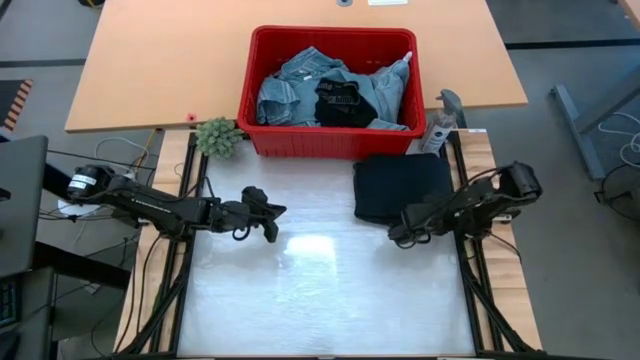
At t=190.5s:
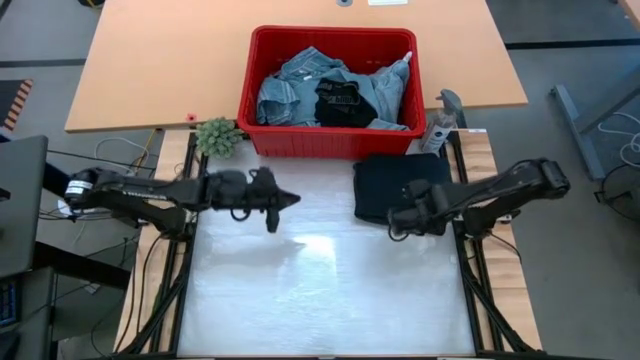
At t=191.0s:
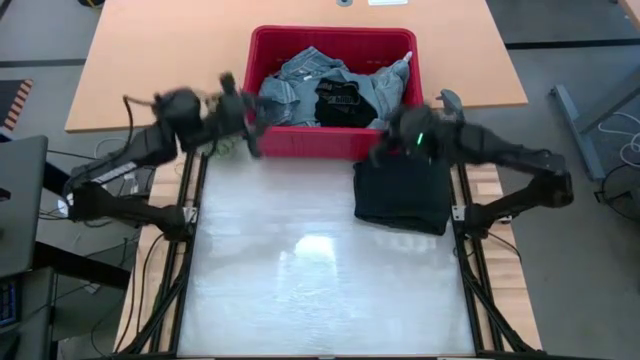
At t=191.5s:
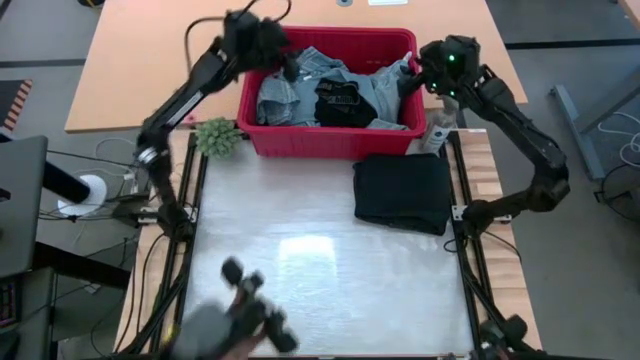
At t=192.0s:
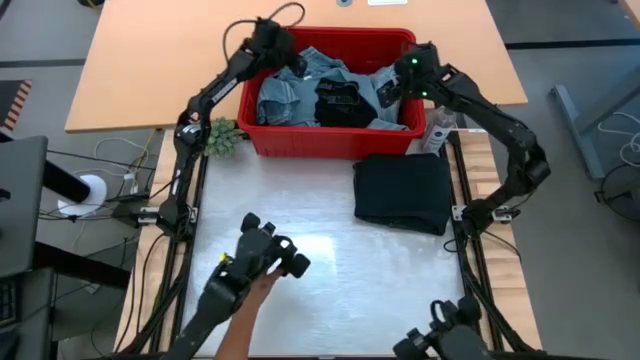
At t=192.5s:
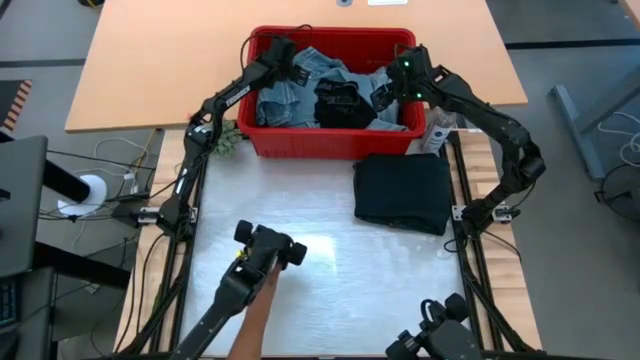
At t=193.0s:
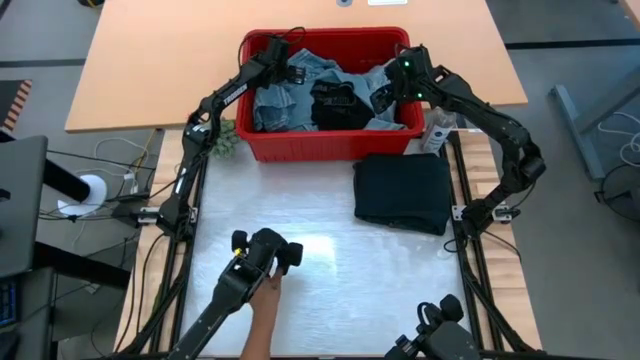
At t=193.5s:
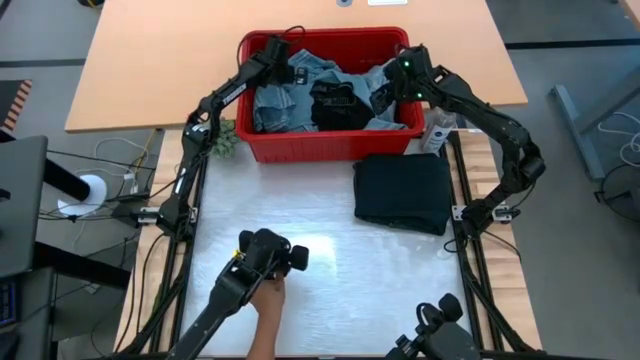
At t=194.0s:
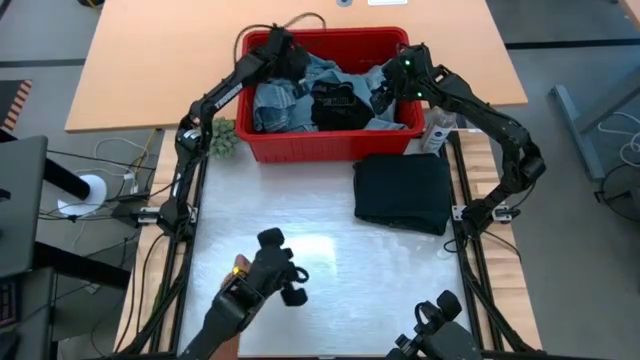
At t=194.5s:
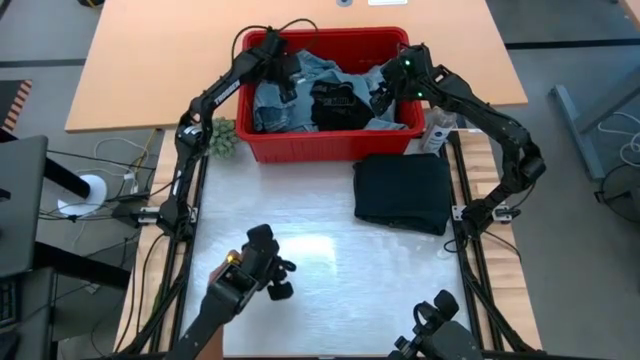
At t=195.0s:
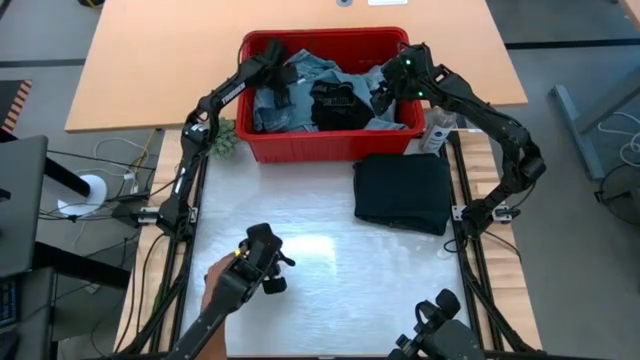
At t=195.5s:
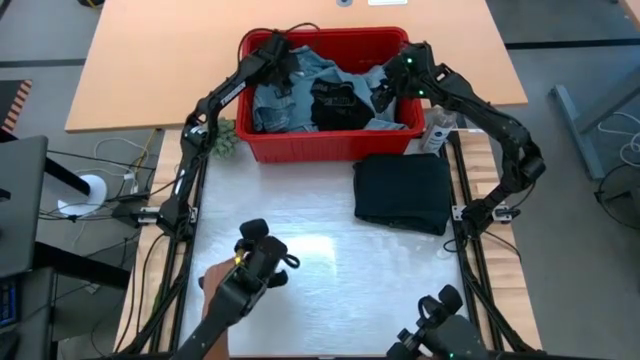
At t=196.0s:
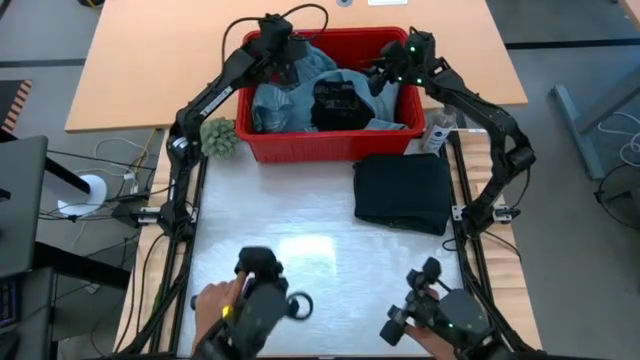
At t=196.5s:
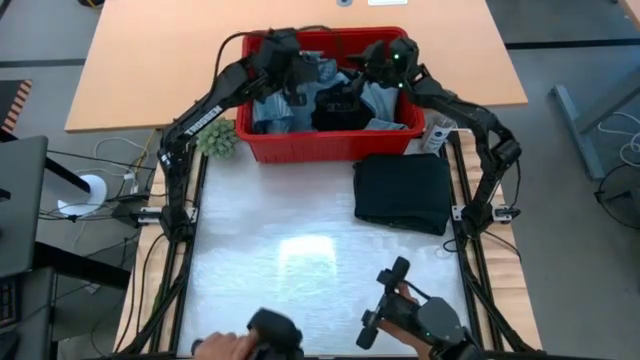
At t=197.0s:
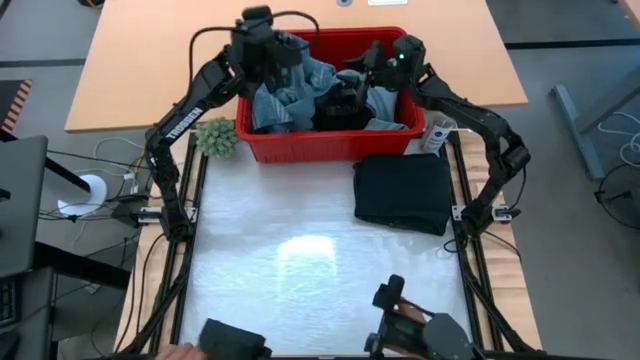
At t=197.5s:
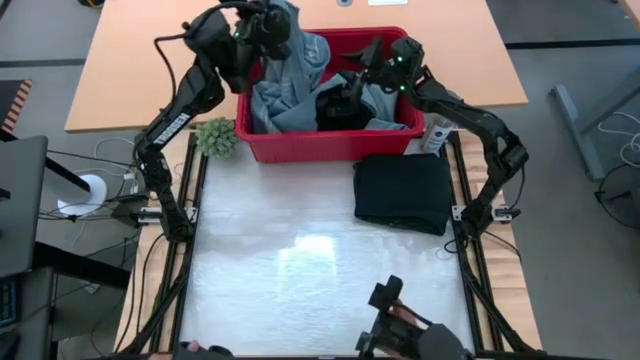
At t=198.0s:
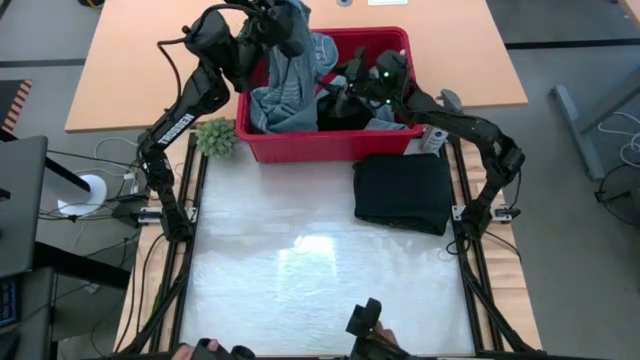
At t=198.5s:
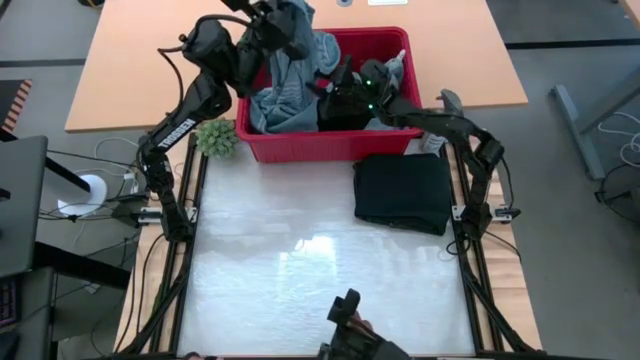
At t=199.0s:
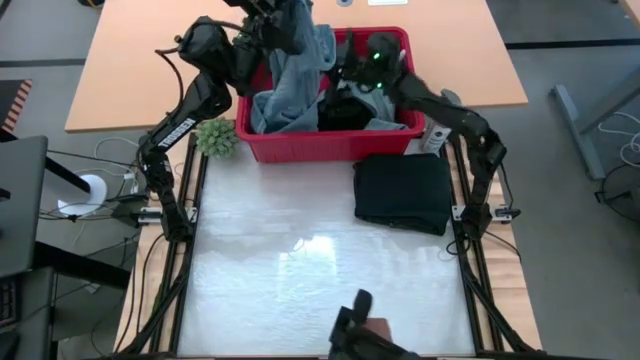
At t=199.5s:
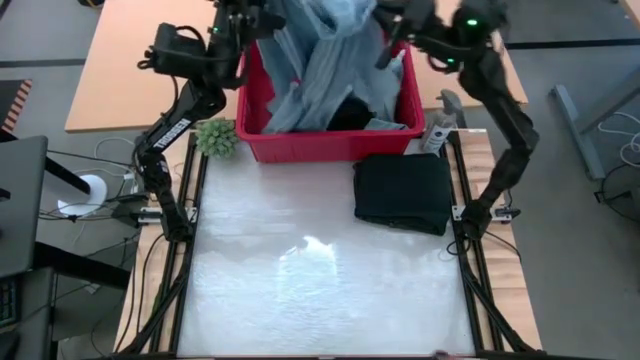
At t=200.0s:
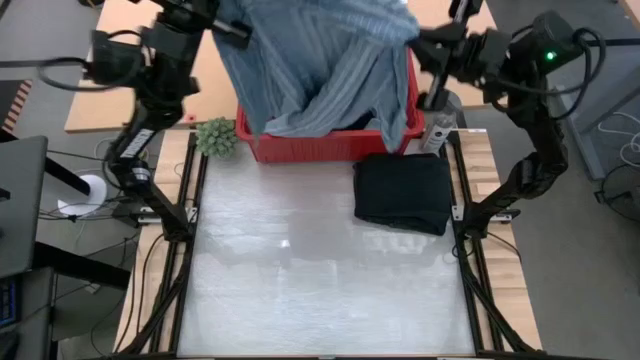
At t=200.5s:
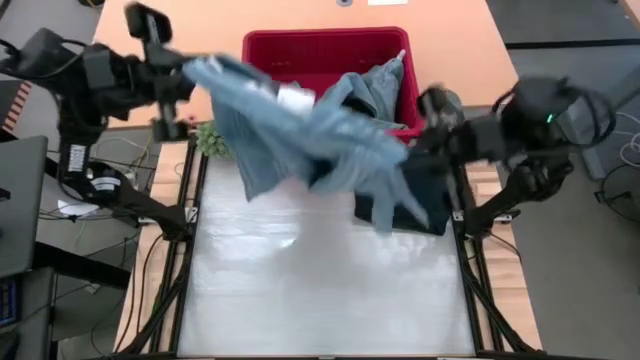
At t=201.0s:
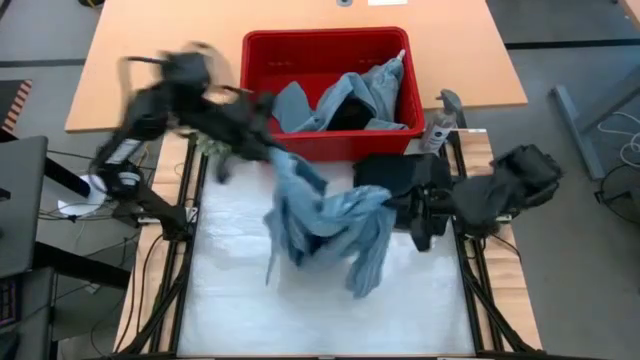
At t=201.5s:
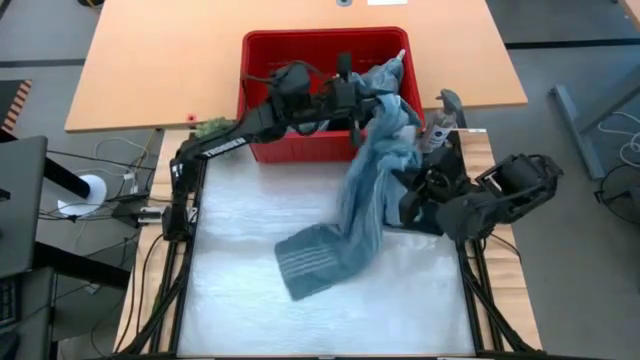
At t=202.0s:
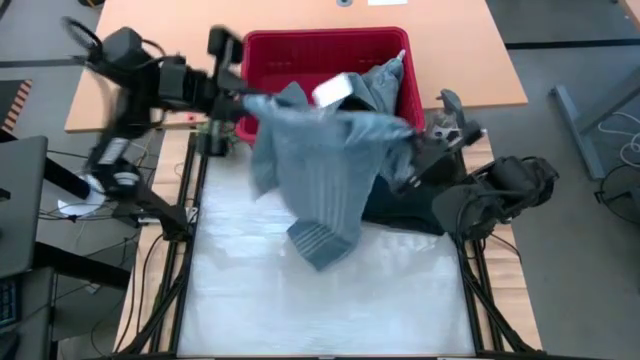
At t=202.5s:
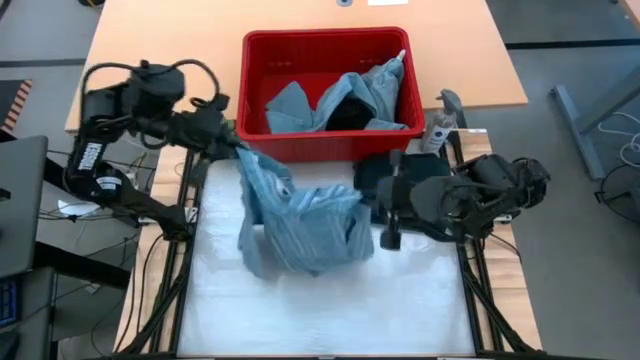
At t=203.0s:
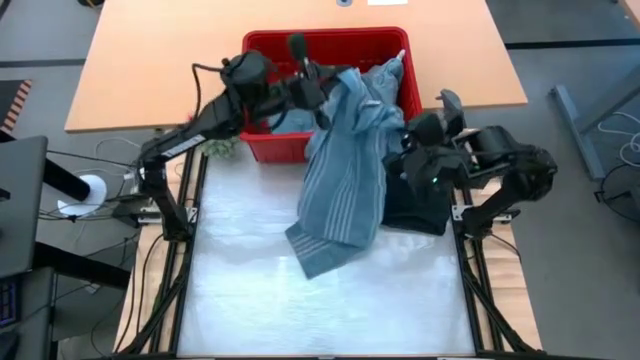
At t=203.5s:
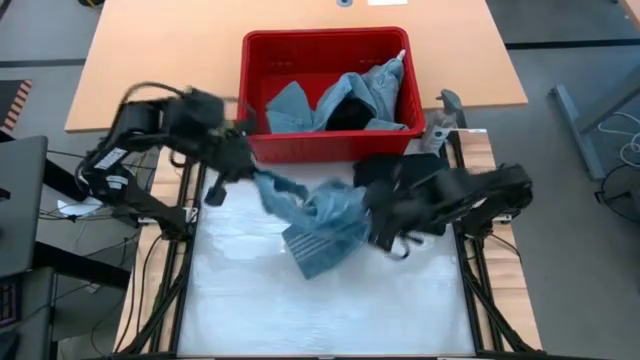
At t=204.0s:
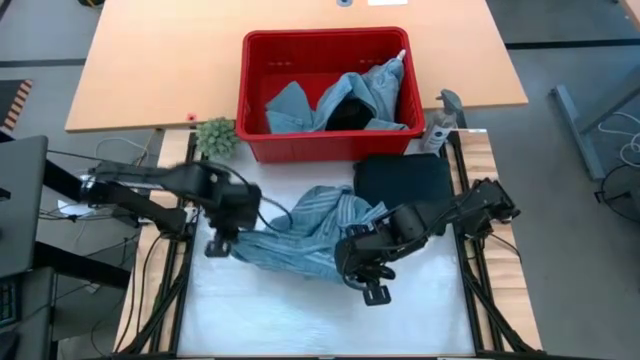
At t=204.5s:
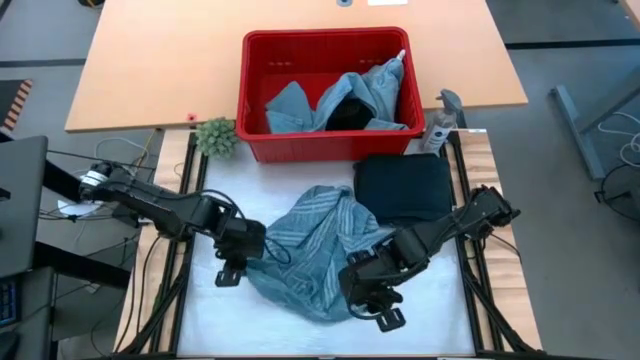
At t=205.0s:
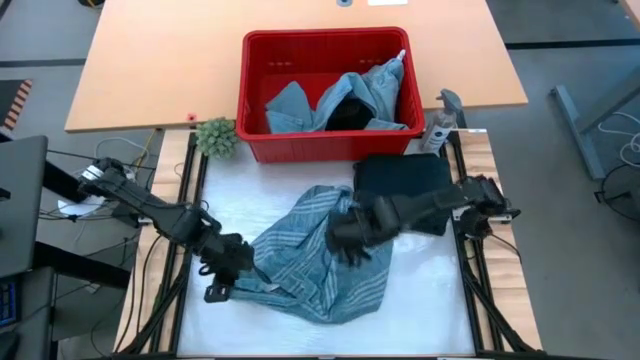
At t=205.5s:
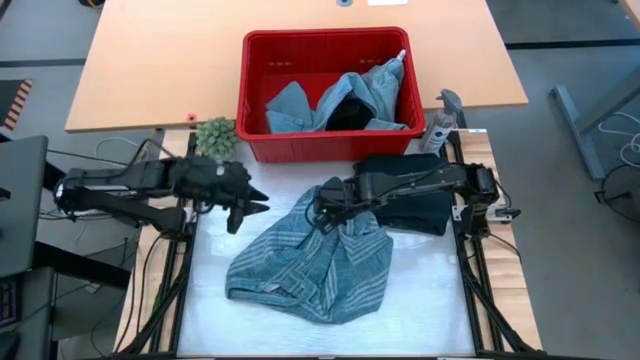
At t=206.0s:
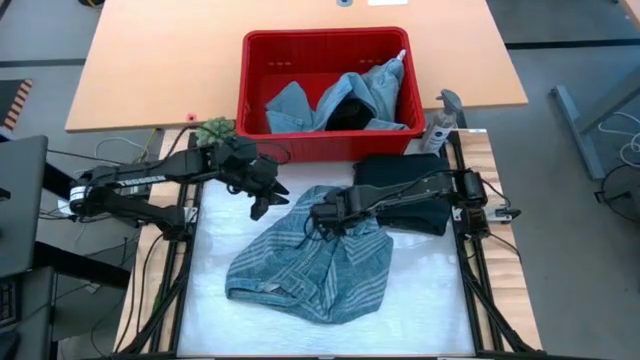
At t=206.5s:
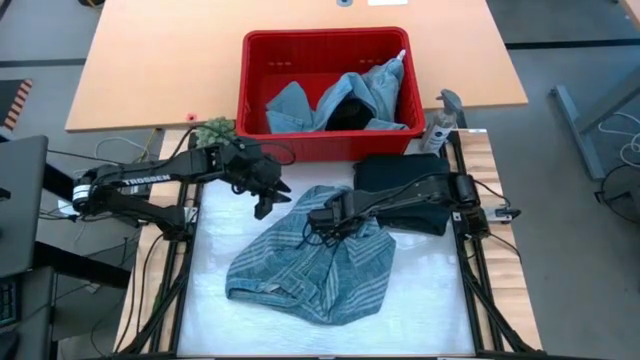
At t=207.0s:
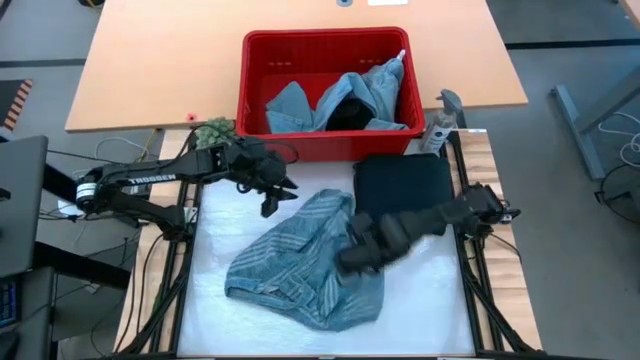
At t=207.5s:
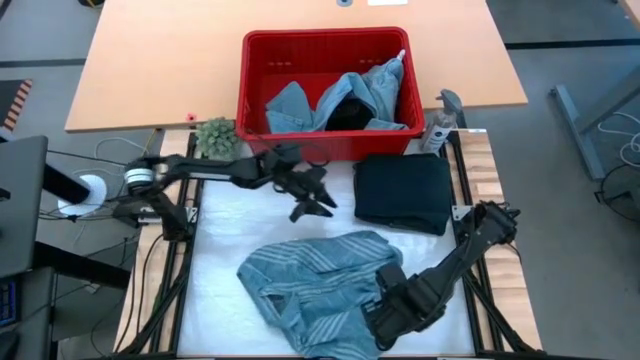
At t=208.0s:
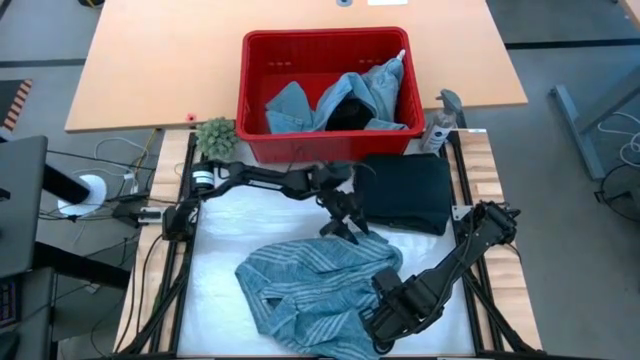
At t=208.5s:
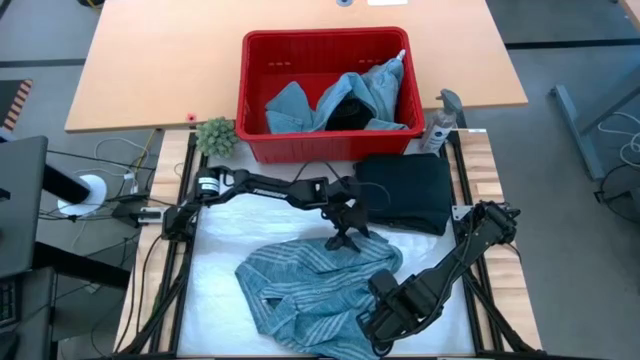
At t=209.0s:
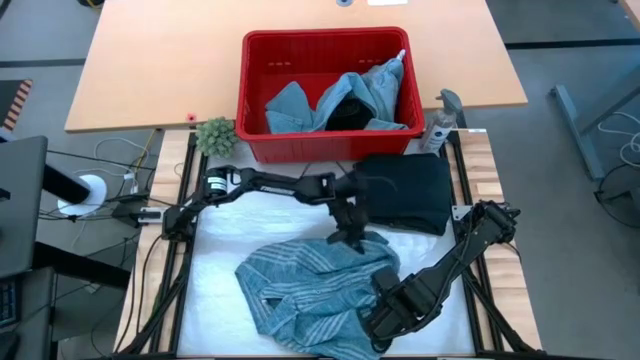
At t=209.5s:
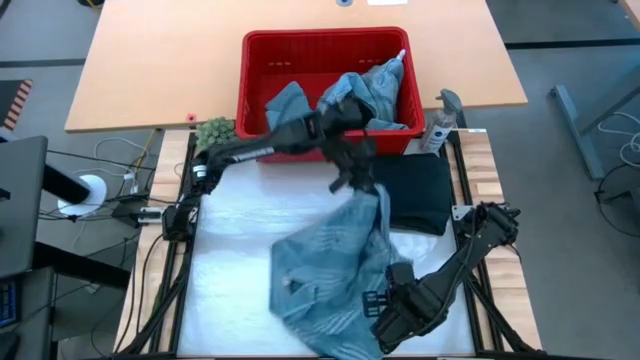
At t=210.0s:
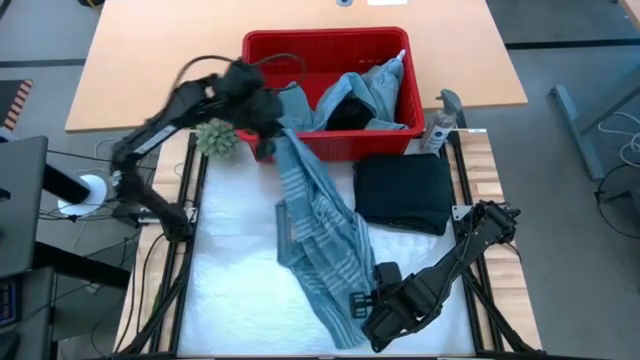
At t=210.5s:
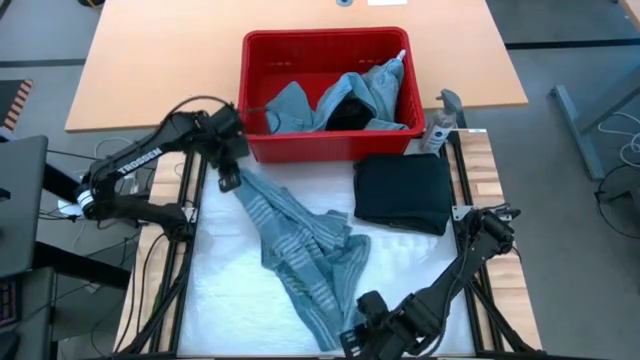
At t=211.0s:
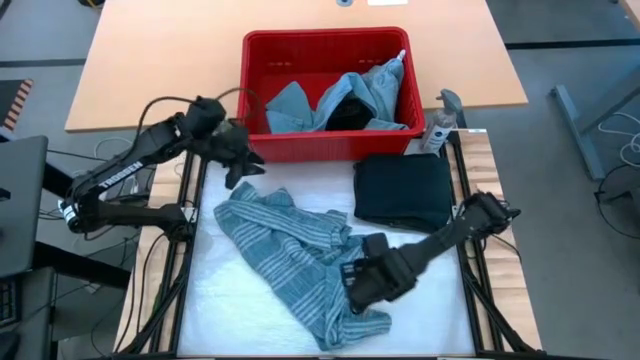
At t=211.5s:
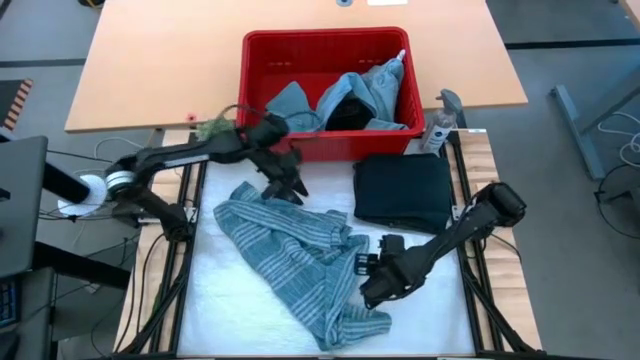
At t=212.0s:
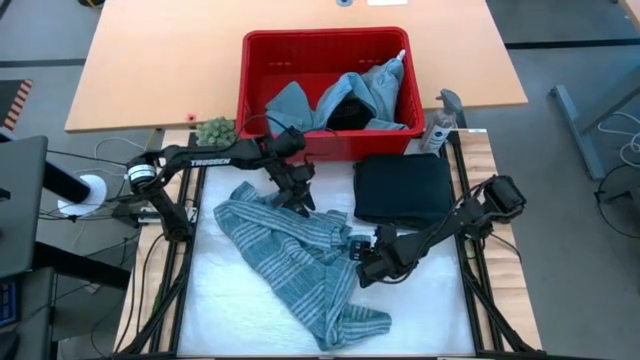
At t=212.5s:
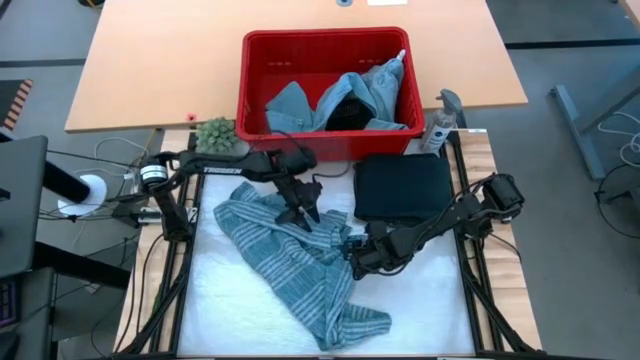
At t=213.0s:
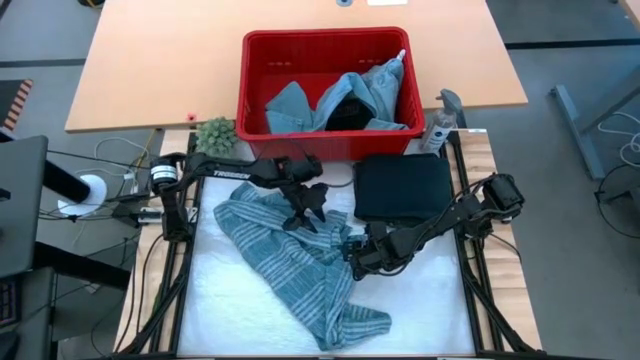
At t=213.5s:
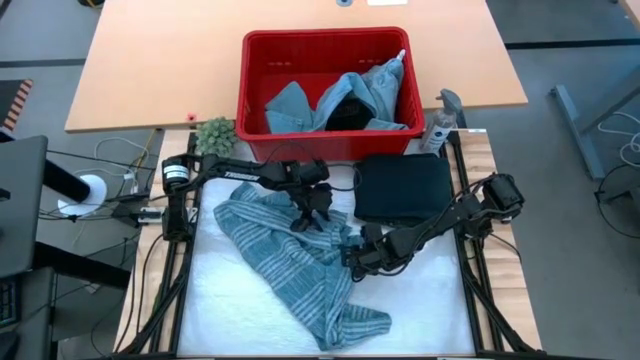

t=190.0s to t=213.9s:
Task: Fold Laundry from Bin
Fold the blue polo shirt
